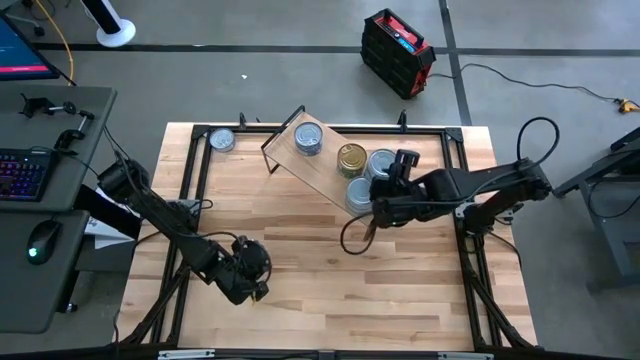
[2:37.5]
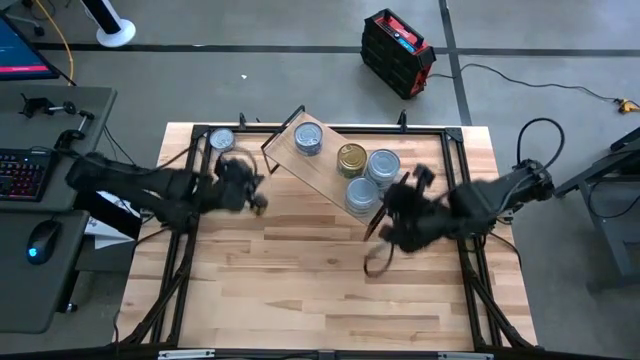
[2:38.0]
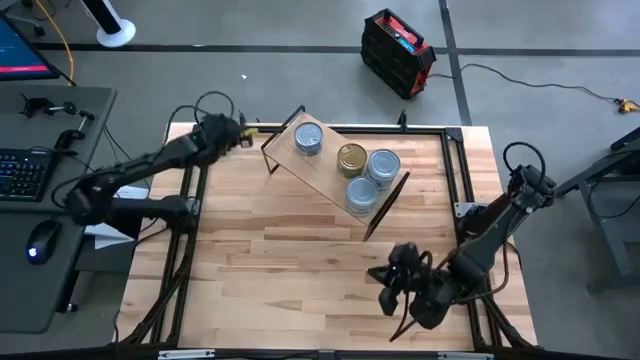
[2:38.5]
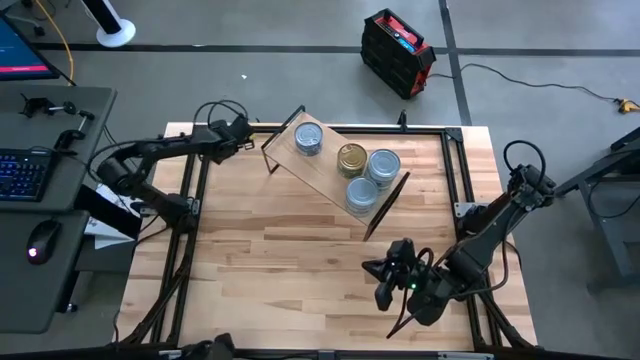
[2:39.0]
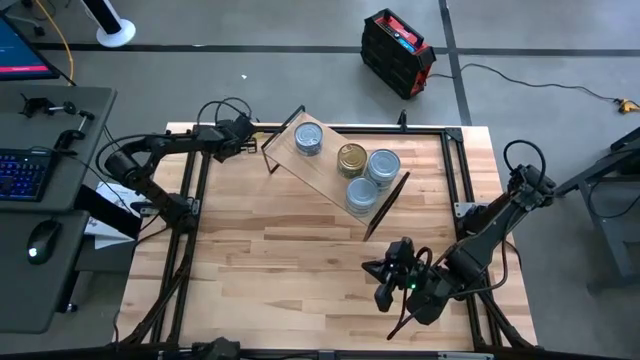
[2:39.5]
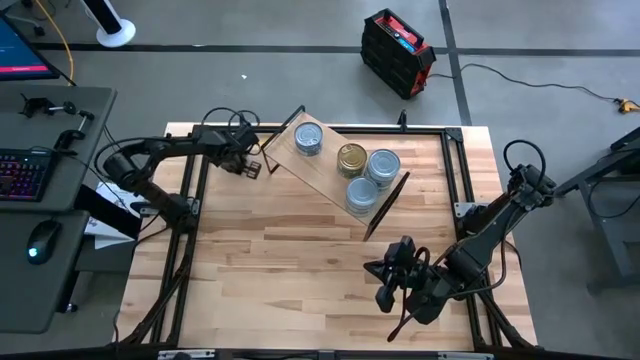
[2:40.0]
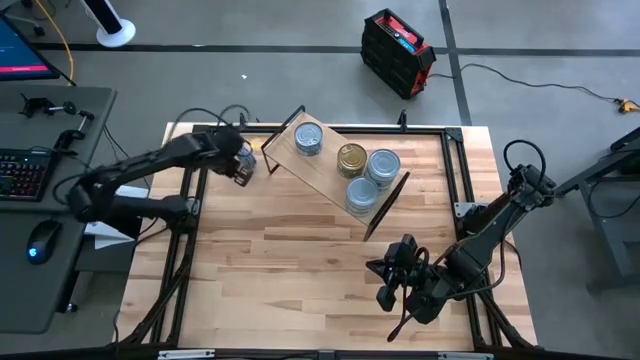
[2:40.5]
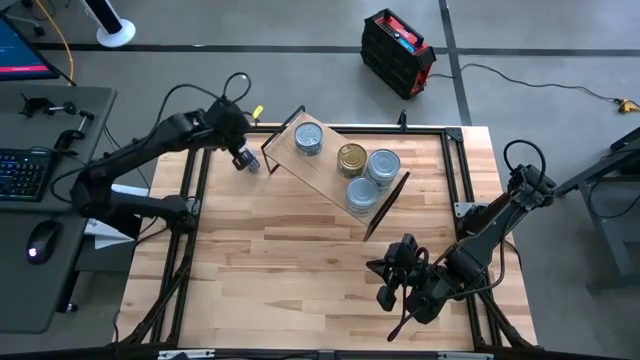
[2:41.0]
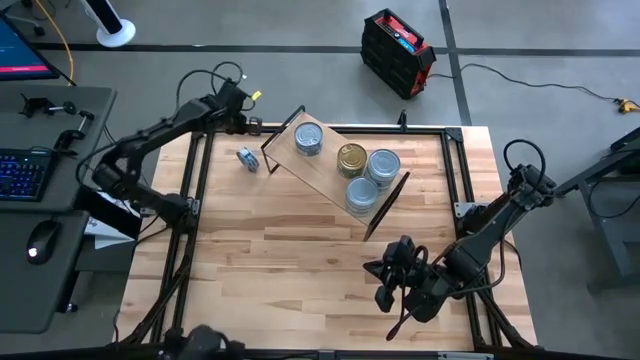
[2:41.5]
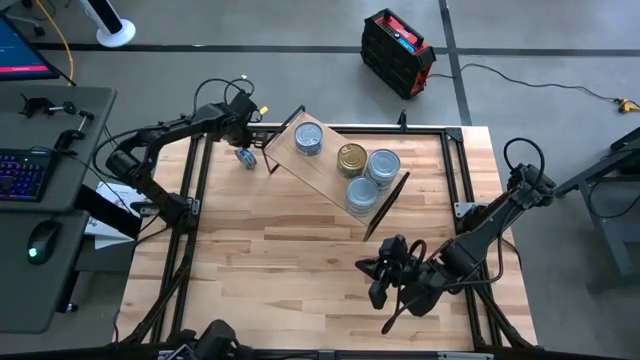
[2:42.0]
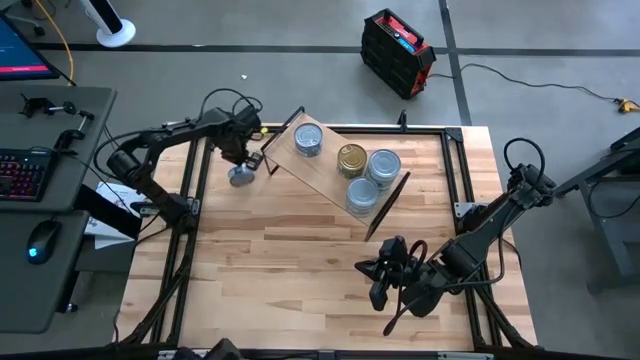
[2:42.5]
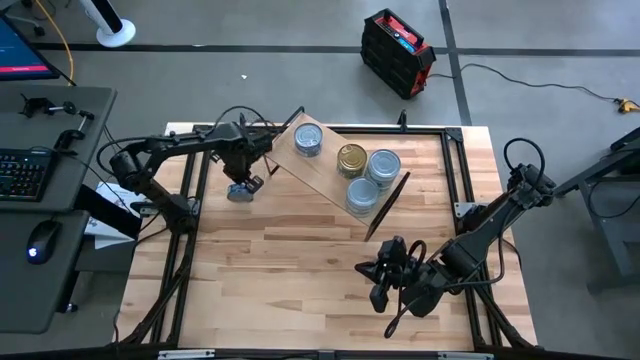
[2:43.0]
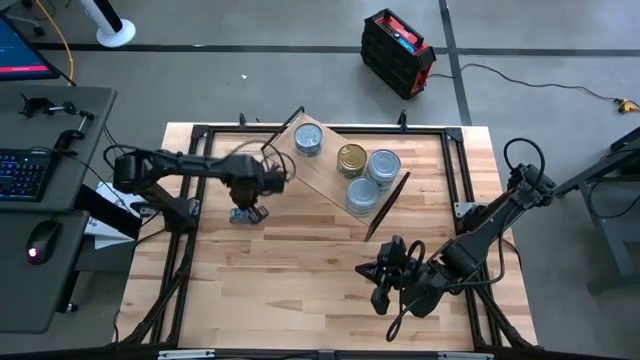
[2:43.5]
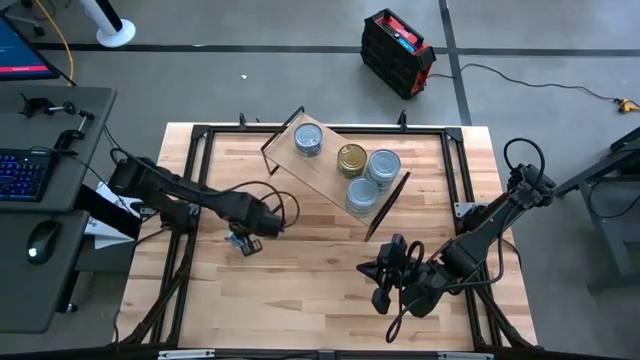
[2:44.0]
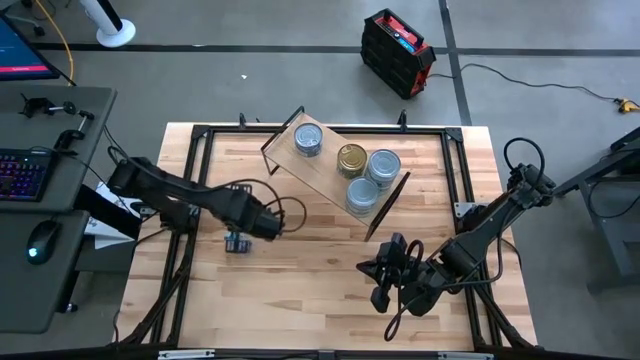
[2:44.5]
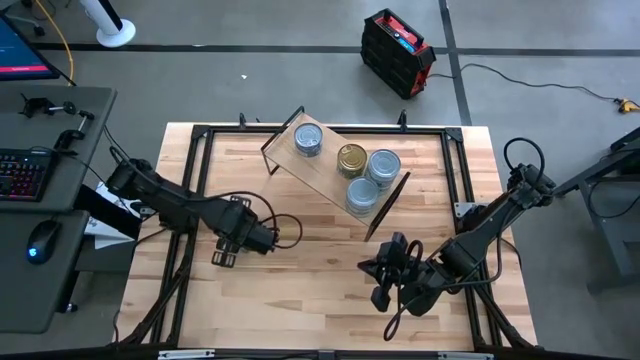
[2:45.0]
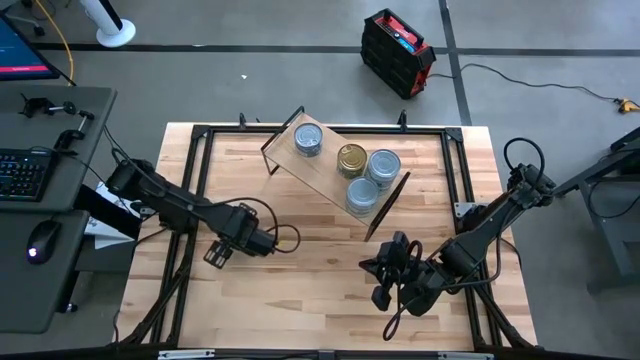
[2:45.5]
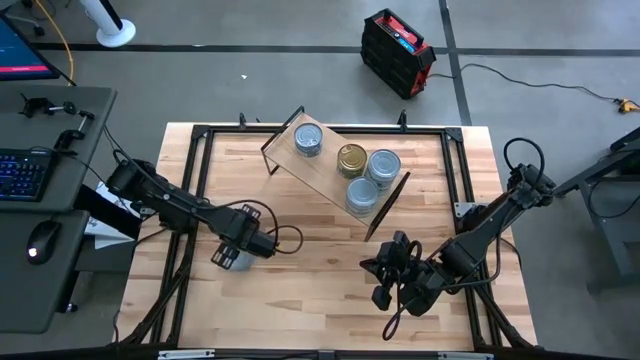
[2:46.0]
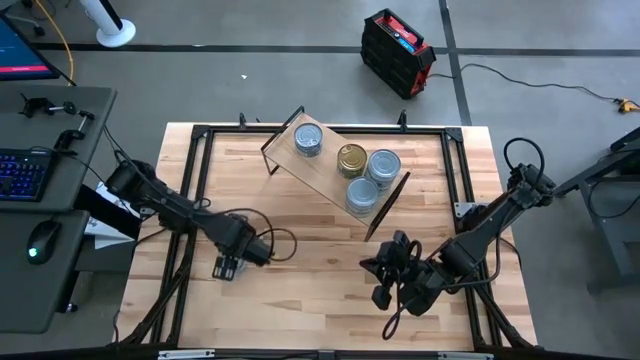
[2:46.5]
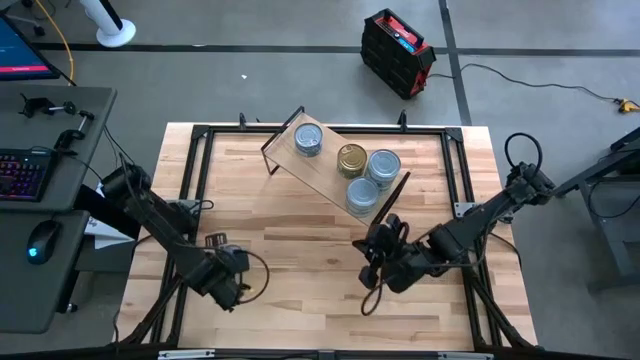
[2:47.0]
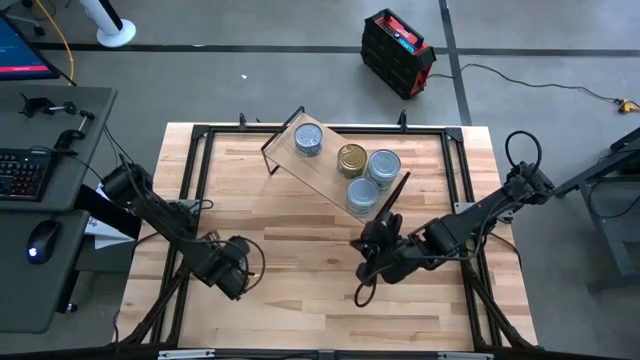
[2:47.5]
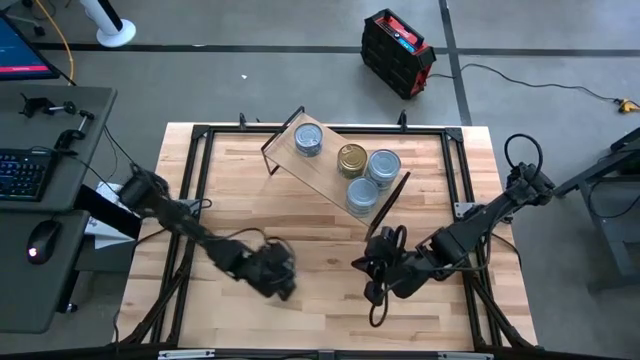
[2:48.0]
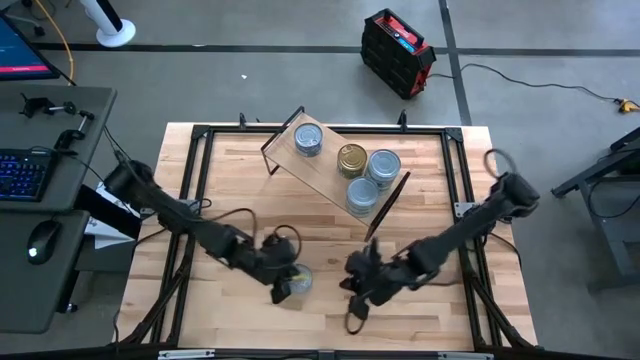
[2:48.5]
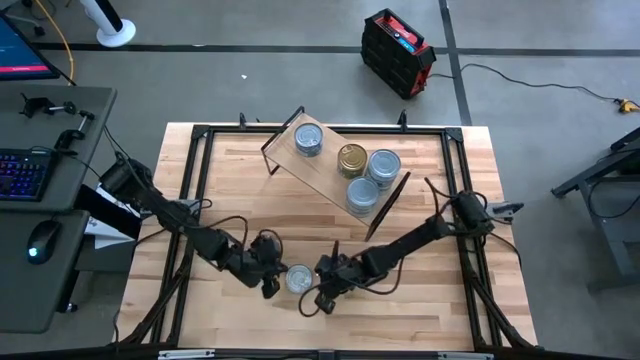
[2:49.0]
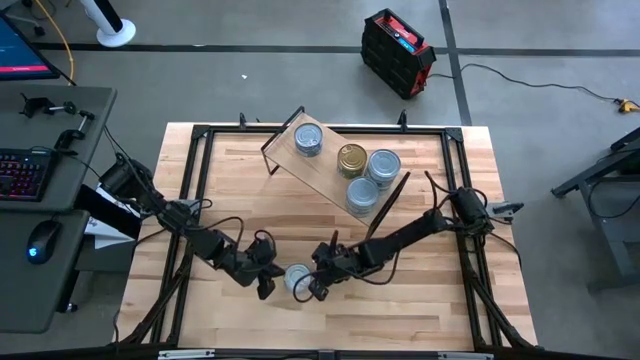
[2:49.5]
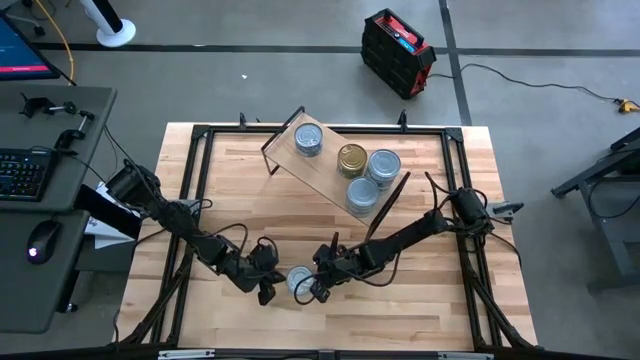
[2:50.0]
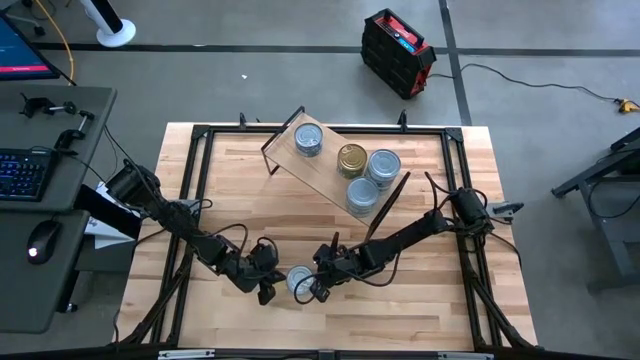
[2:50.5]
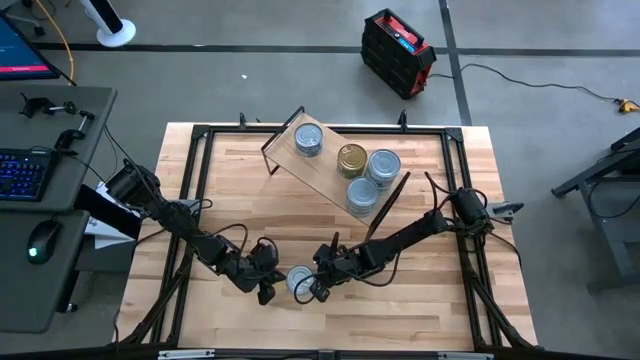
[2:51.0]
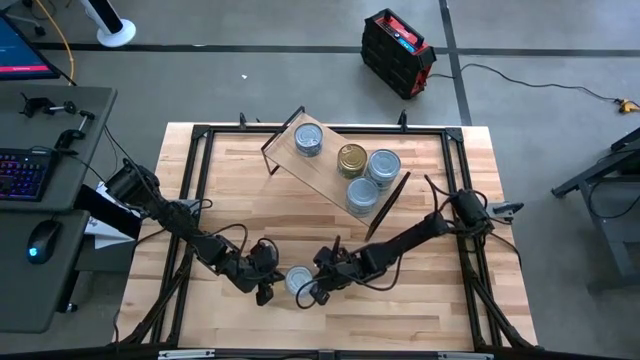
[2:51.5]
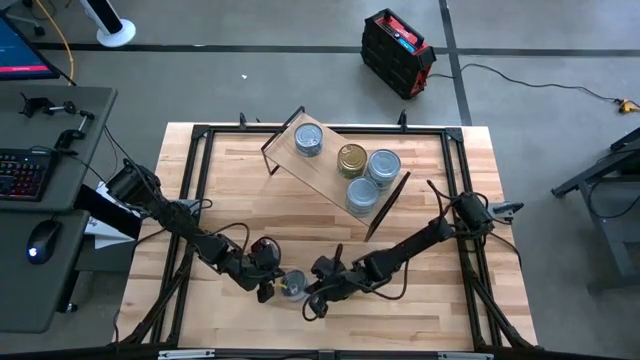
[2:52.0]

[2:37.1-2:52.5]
Task: Stack canned seafood by type on shelf
Stack the blue tuna can on top of the other blue tuna cans on the shelf

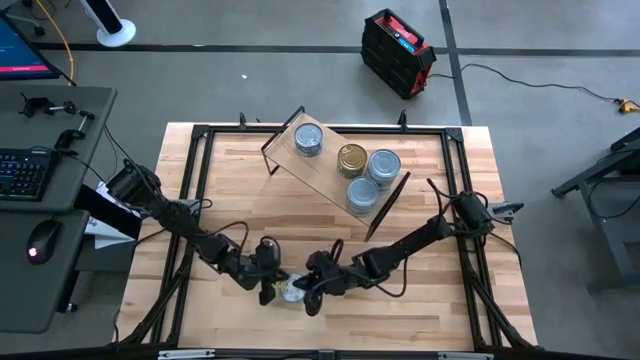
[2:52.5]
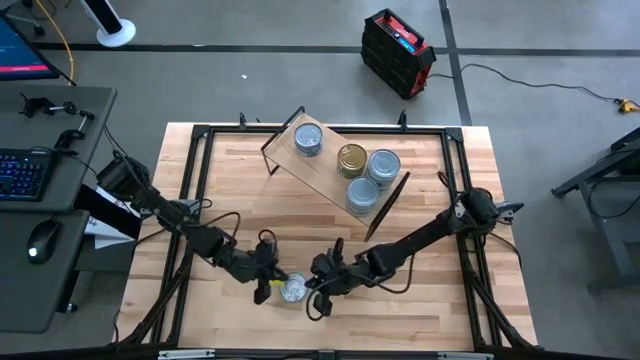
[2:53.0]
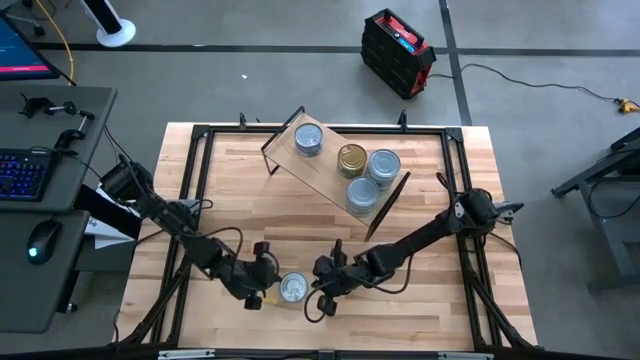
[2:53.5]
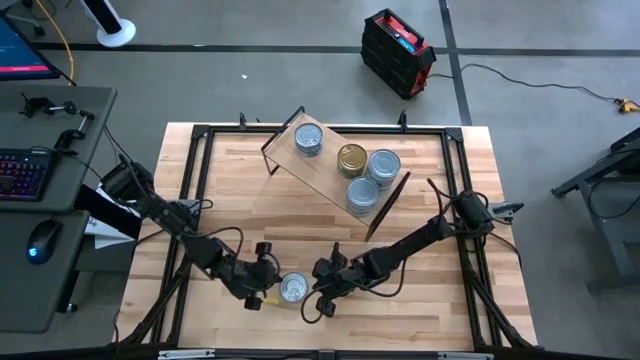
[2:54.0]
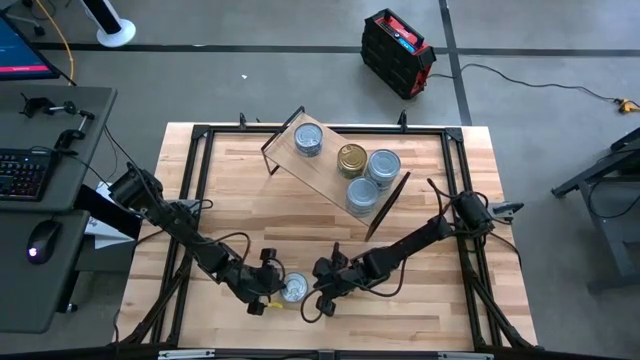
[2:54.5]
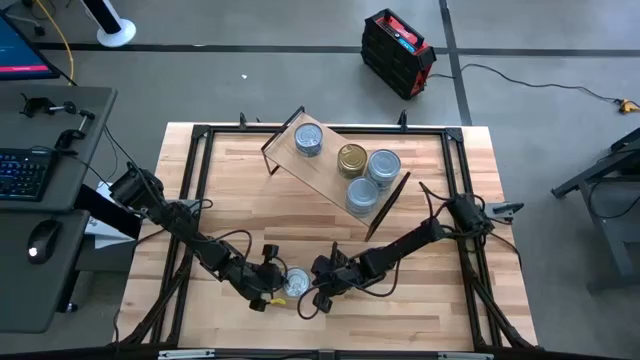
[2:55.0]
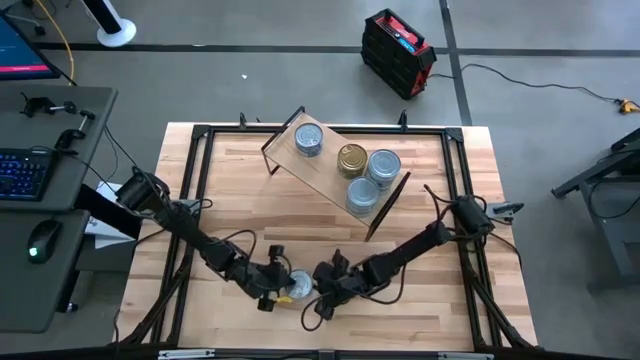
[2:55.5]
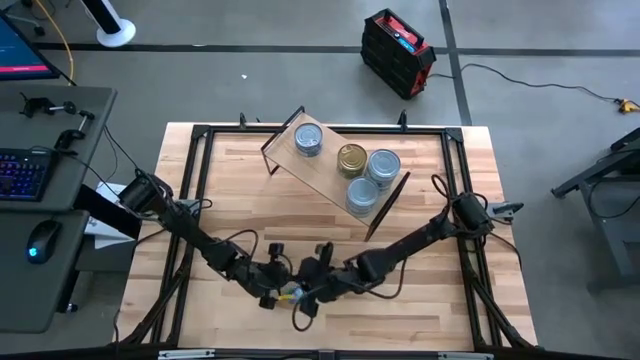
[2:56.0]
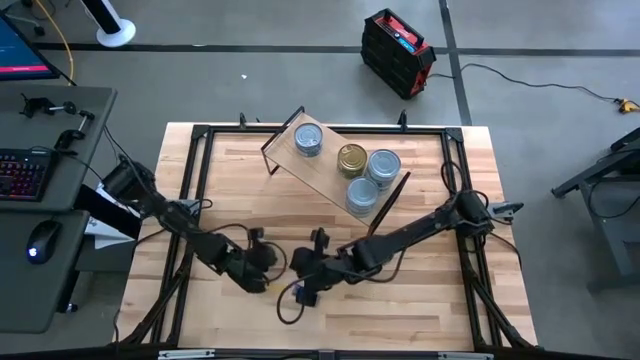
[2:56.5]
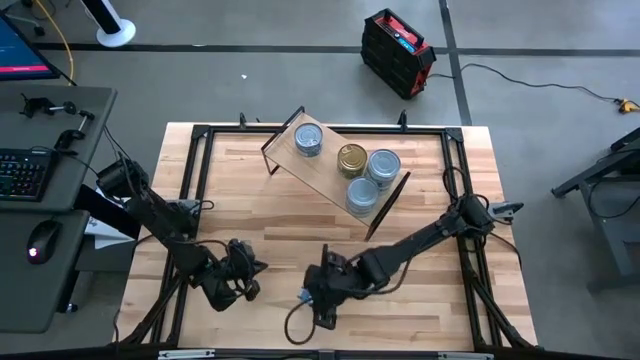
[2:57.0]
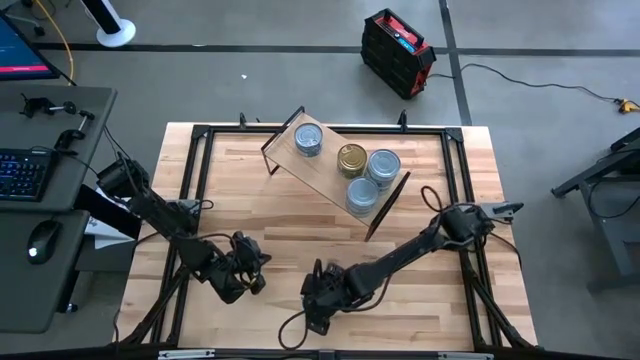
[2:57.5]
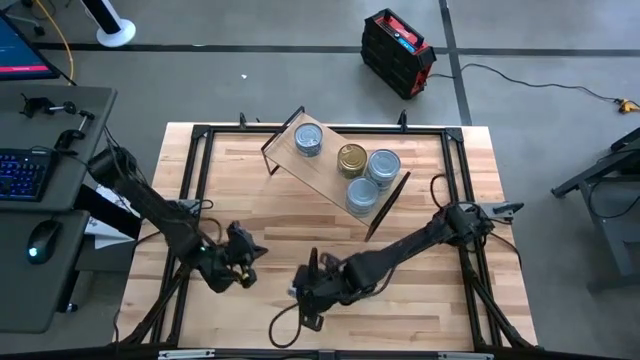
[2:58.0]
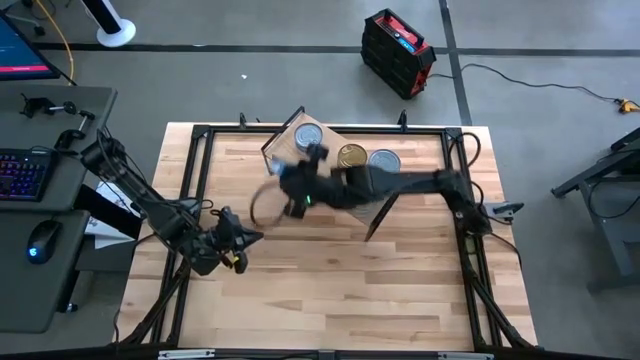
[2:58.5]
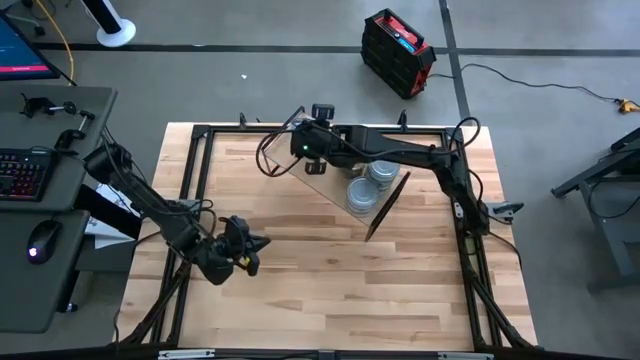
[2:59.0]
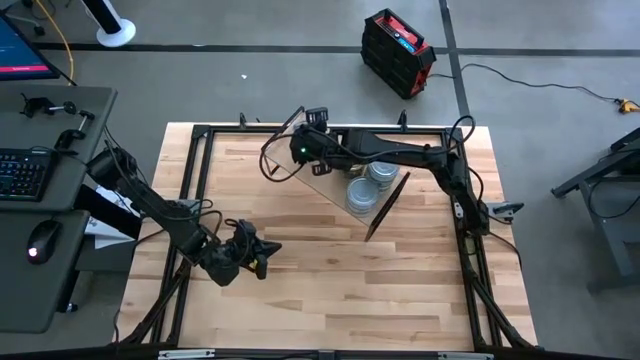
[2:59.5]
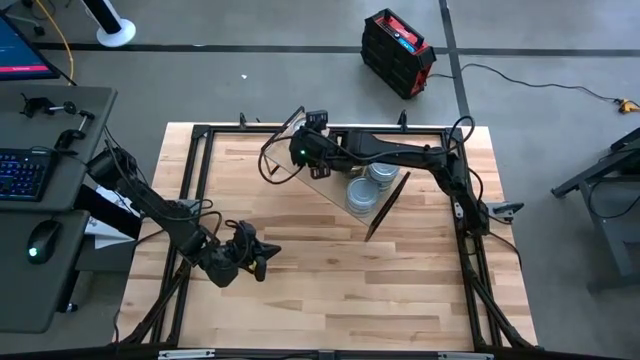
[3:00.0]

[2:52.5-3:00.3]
Stack the blue tuna can on top of the other blue tuna cans on the shelf
